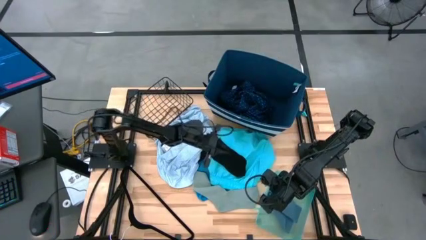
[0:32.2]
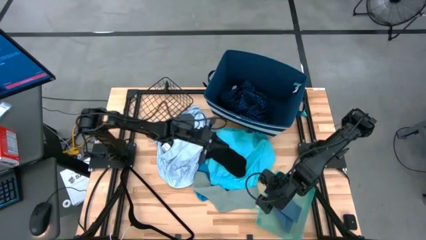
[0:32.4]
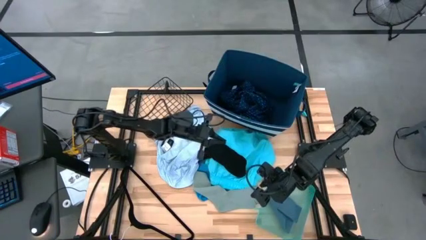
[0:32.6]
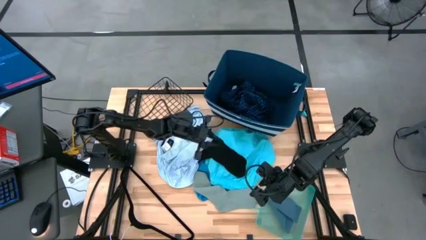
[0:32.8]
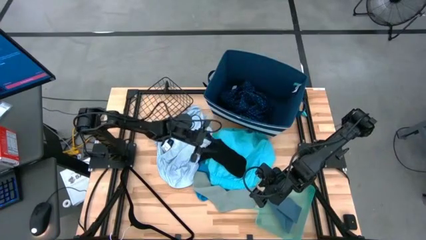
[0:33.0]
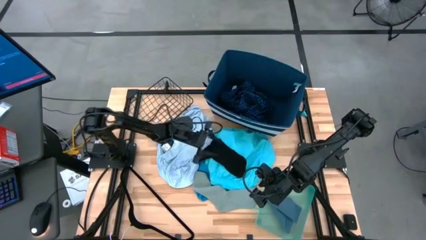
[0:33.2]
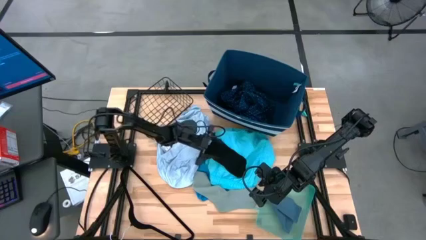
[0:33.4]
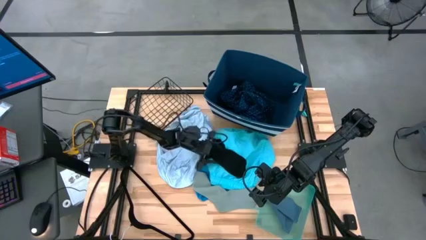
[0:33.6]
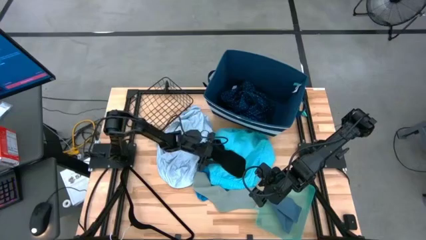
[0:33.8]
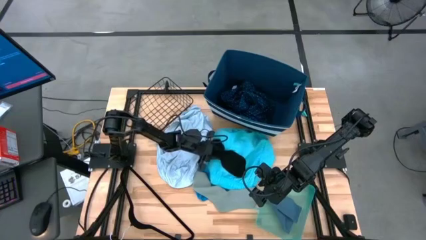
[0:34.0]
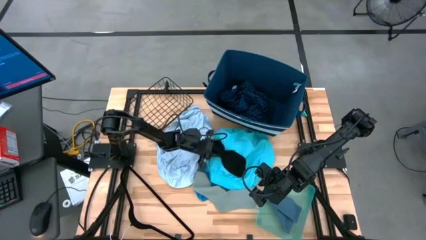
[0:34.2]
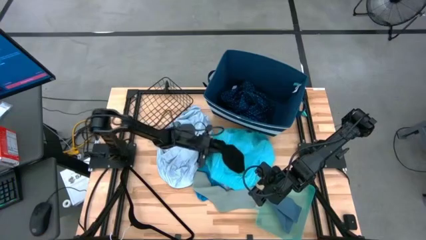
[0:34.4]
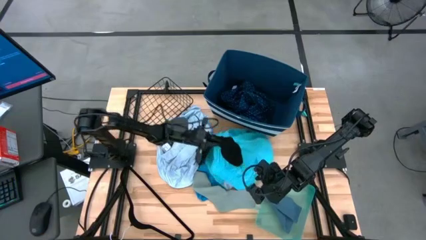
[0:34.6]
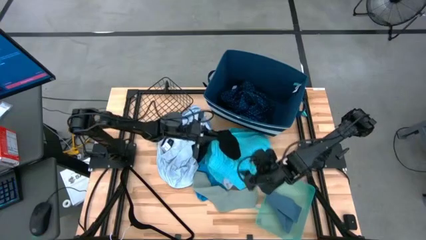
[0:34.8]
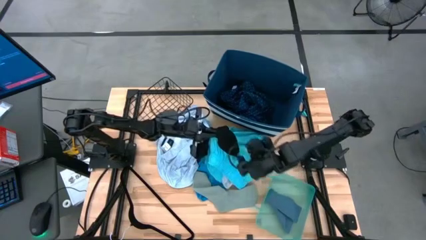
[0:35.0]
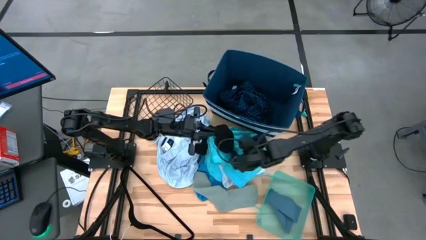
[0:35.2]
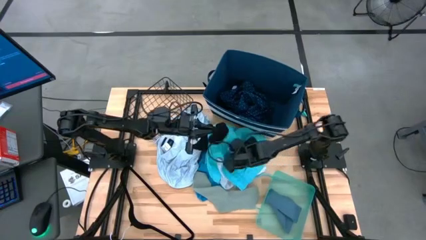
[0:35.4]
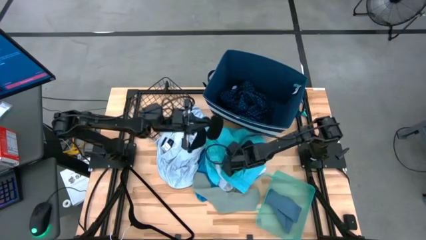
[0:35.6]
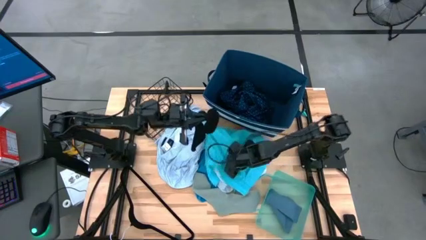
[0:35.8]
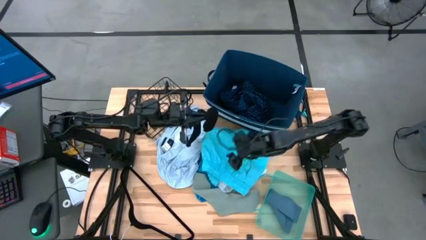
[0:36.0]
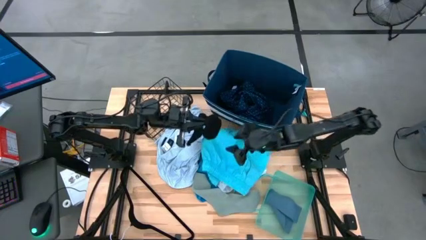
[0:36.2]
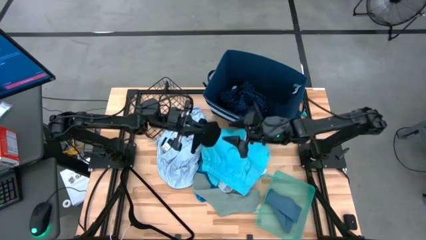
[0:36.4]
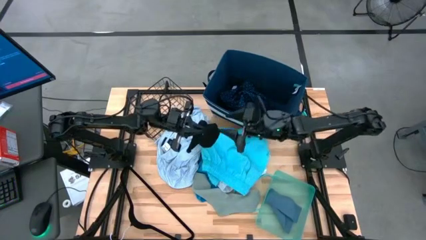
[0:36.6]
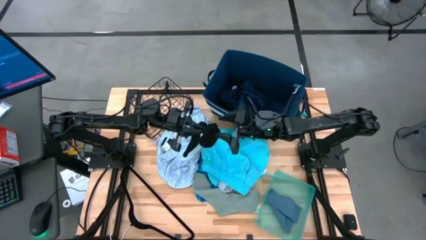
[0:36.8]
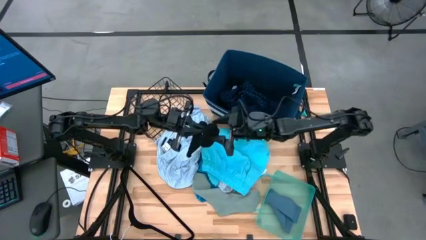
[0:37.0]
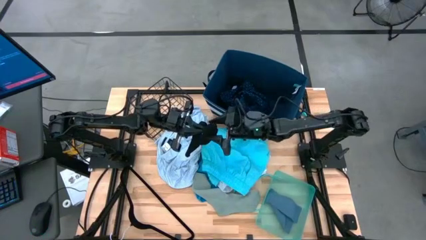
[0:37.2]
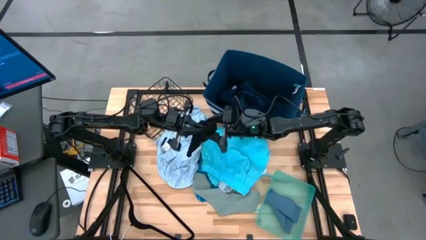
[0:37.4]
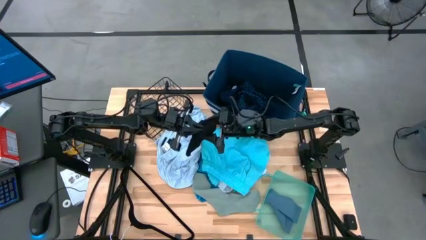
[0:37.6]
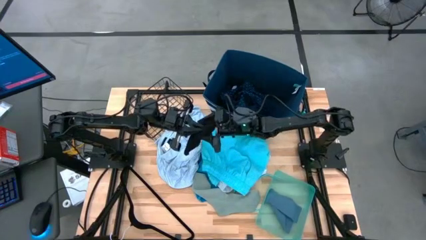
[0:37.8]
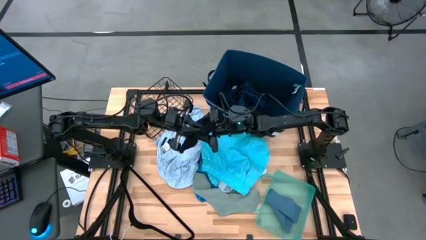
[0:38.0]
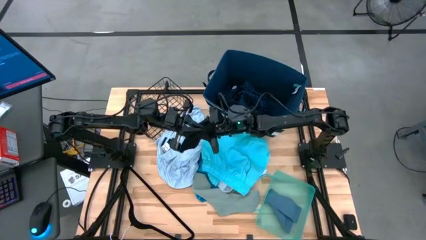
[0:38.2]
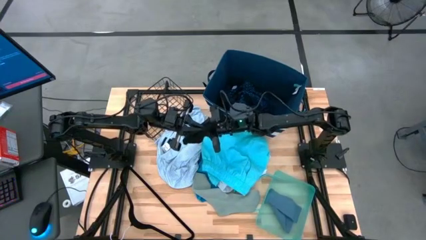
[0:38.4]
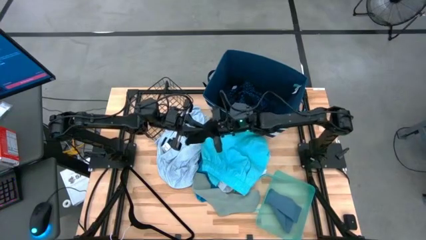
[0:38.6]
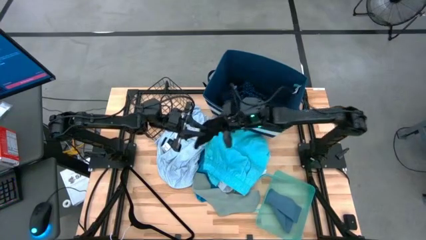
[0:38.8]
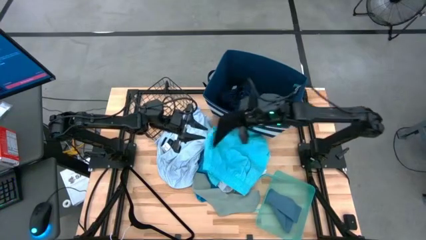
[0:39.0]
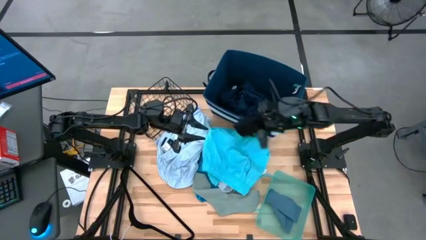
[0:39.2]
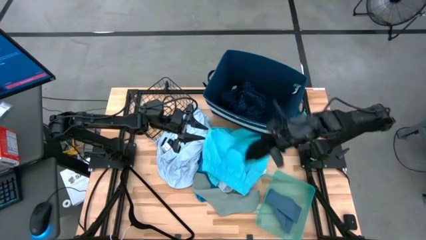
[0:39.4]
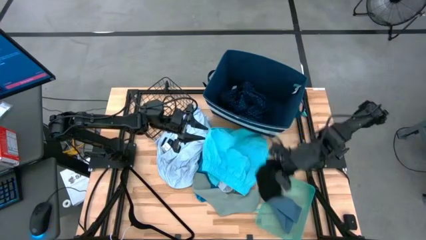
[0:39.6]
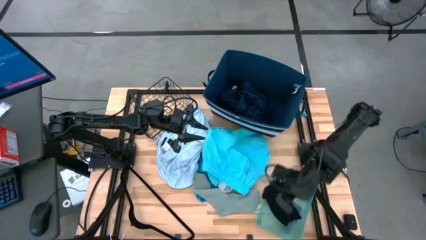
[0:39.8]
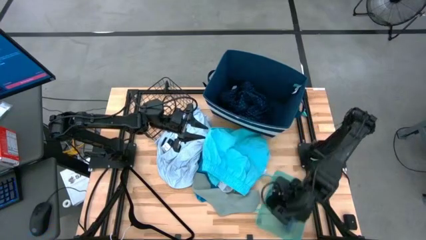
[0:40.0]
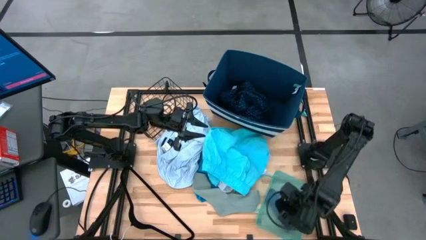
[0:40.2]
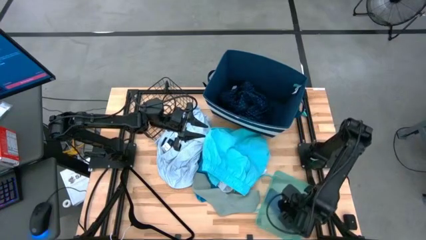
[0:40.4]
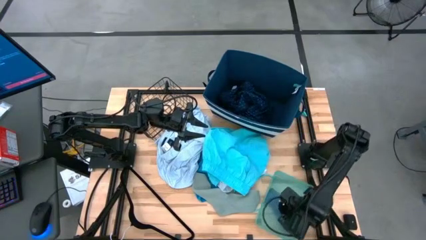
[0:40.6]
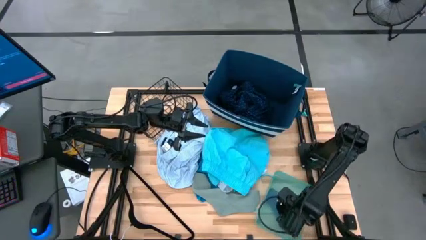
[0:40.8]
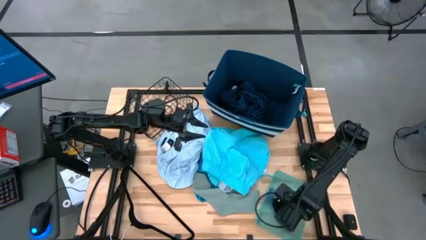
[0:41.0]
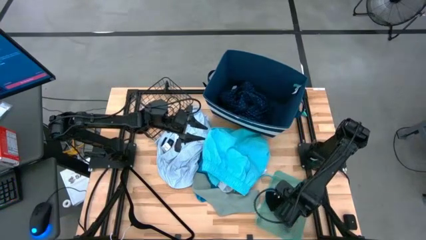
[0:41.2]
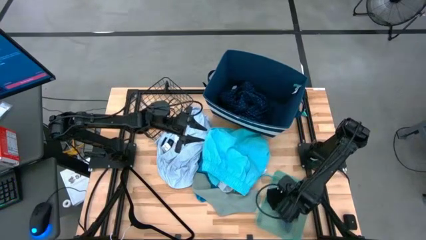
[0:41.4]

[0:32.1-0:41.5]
Task: Pick & Place Cloths
Put the black sock into the green bin

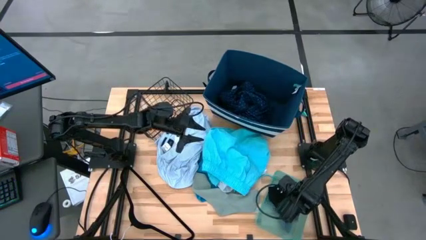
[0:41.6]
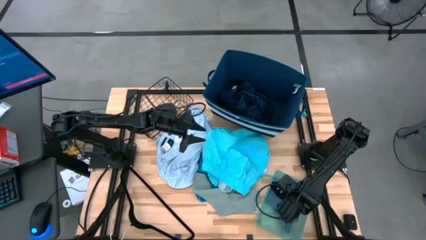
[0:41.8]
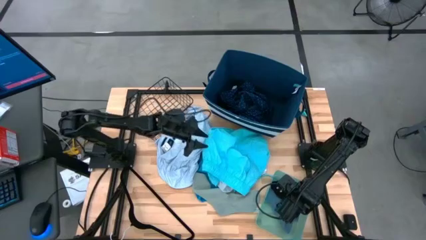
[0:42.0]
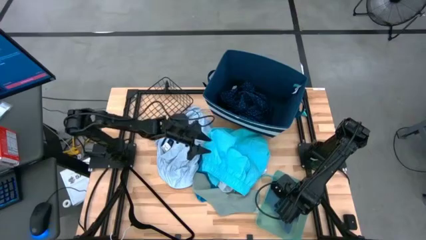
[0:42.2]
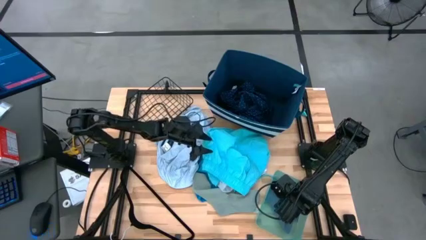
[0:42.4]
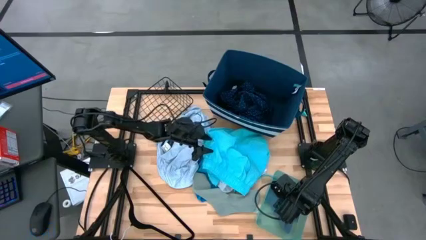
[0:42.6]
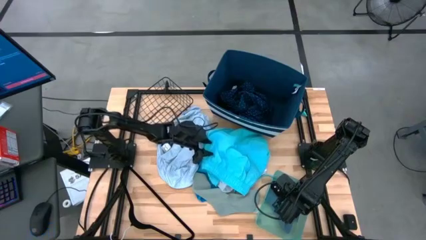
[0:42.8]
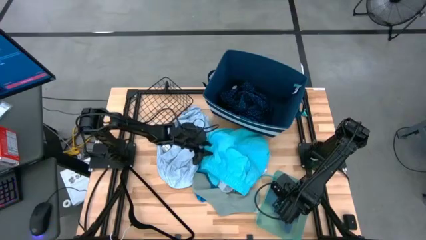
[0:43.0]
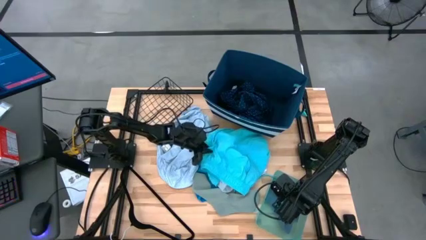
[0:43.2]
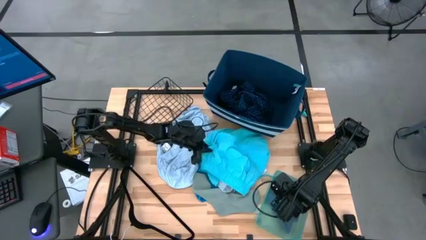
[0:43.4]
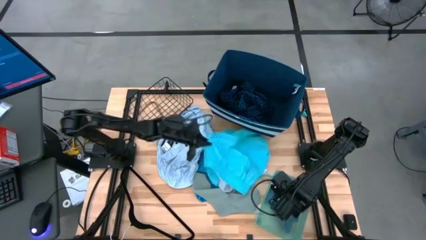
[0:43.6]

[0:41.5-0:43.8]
Put the light blue shorts into the black wire basket

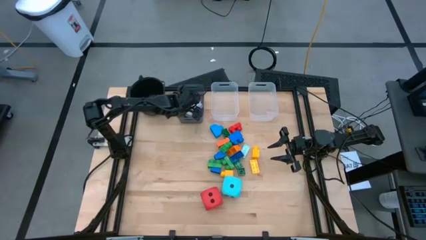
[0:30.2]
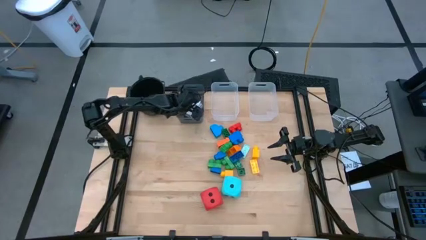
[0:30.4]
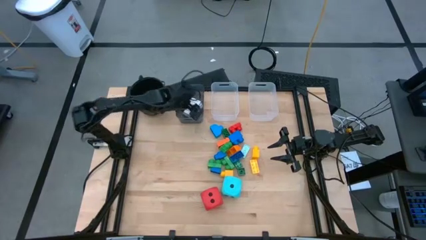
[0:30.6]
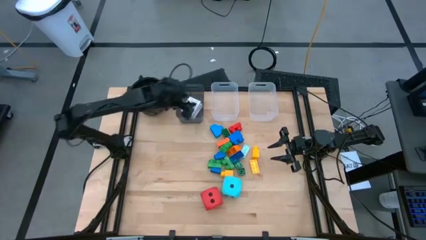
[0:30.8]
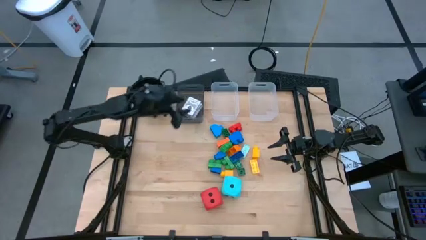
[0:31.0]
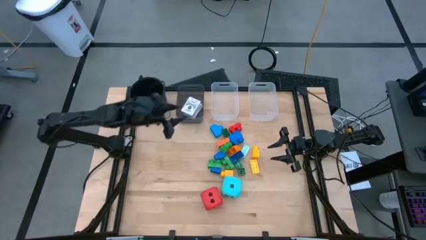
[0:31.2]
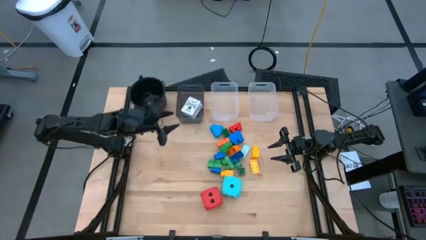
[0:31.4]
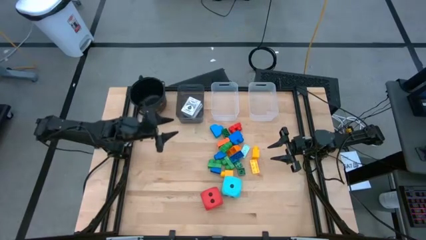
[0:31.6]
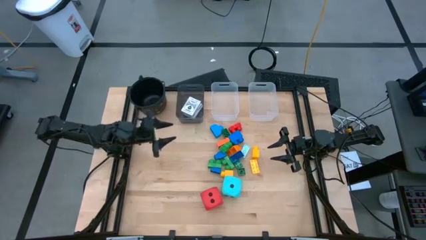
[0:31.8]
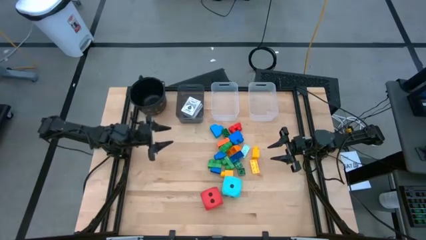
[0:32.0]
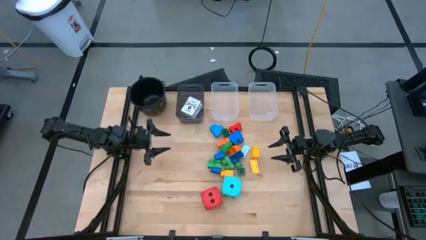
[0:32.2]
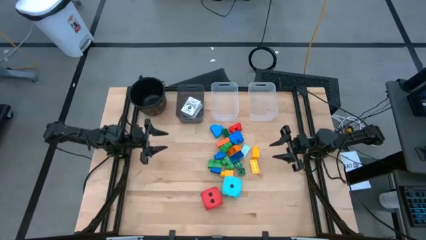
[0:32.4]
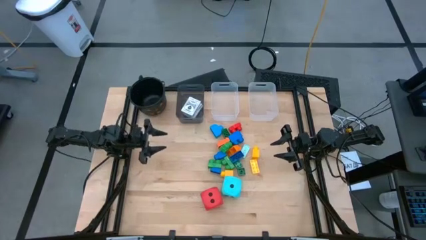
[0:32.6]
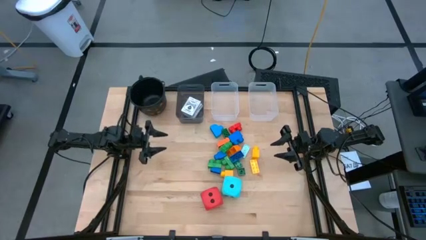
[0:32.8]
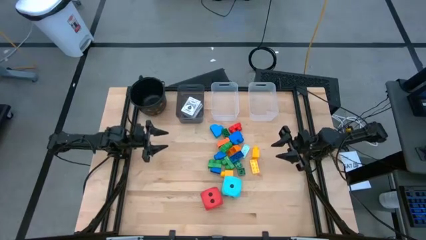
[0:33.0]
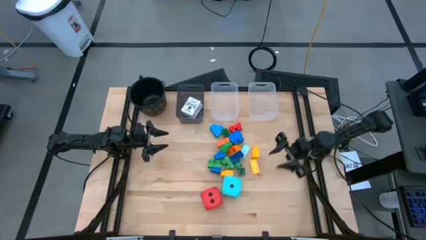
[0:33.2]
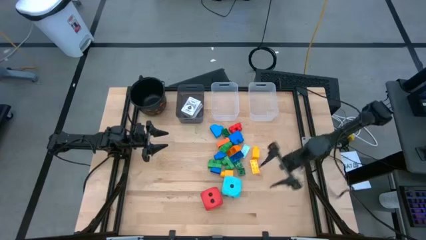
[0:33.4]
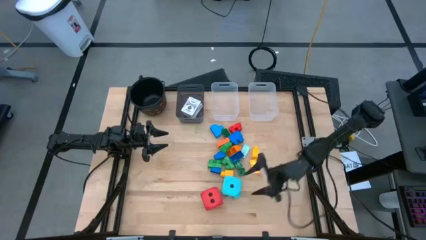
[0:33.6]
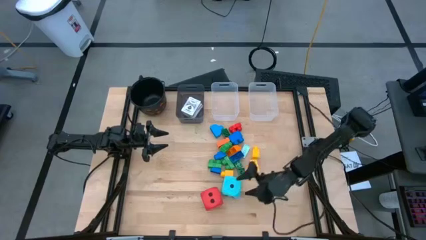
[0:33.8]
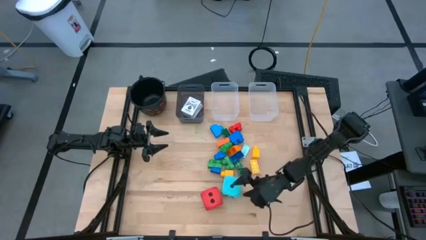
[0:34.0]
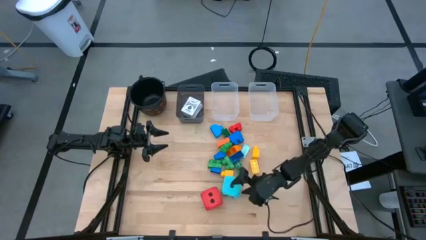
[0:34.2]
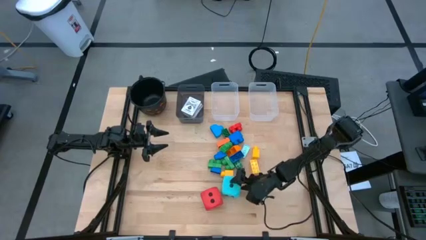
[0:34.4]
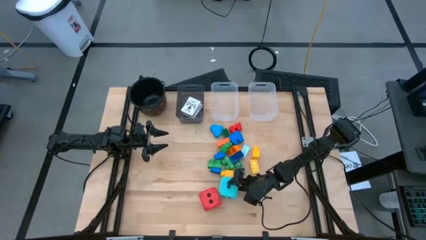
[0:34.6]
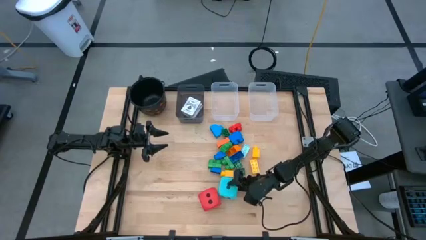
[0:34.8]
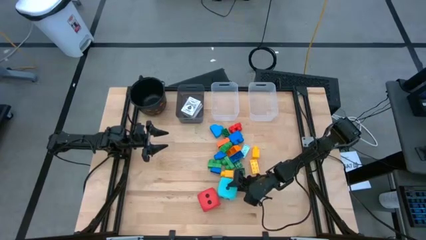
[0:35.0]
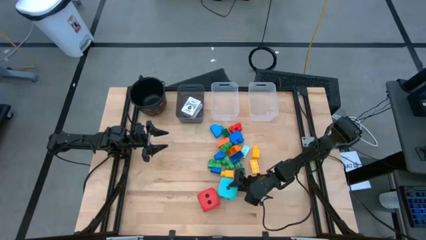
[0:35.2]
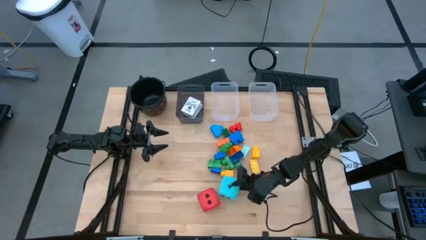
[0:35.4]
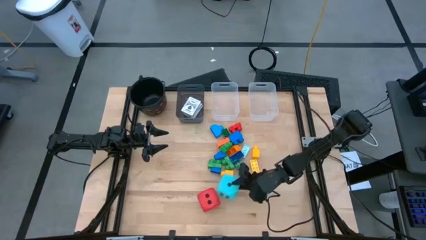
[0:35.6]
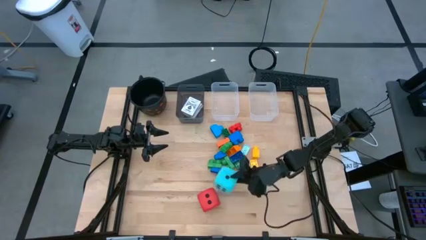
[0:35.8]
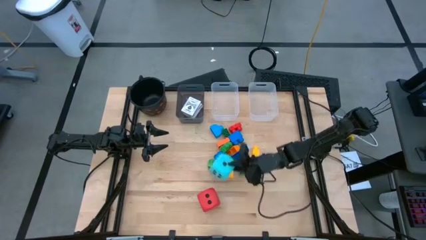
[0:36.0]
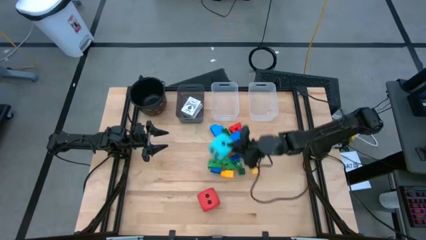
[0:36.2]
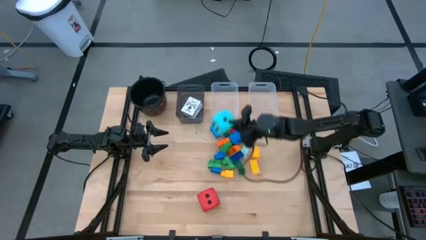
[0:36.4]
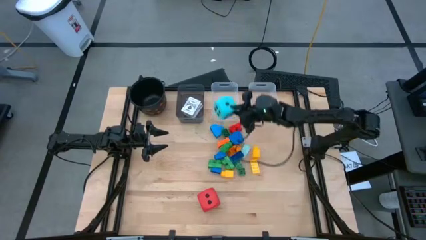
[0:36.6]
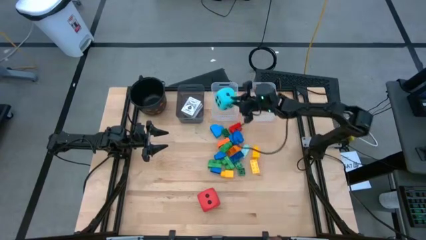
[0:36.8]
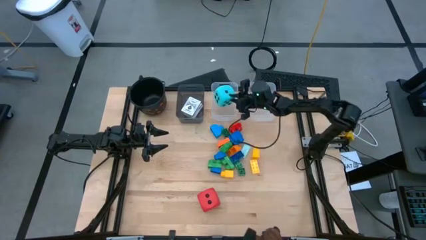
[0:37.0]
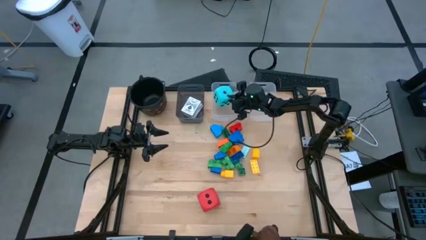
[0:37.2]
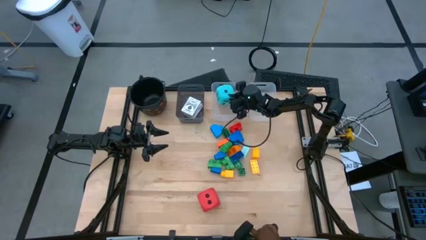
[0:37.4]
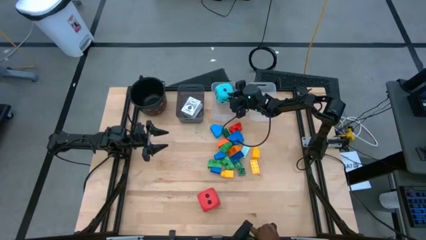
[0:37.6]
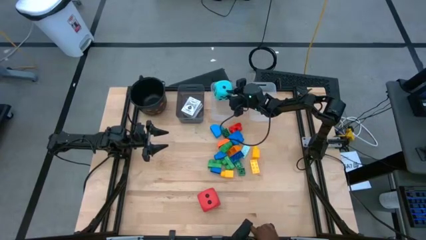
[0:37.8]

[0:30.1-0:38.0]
Task: Pick & Place Toys
Put the light blue dice into the left transparent bin
